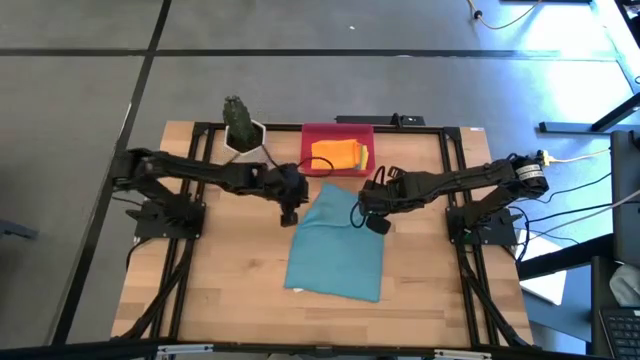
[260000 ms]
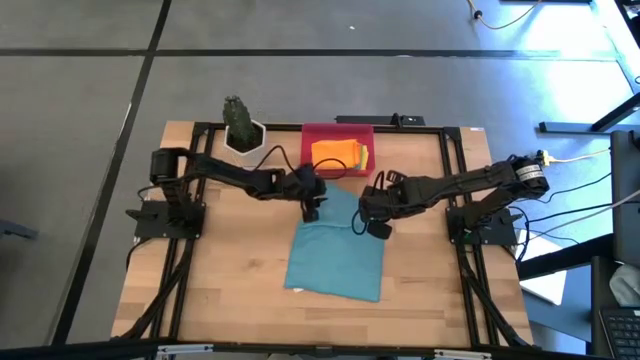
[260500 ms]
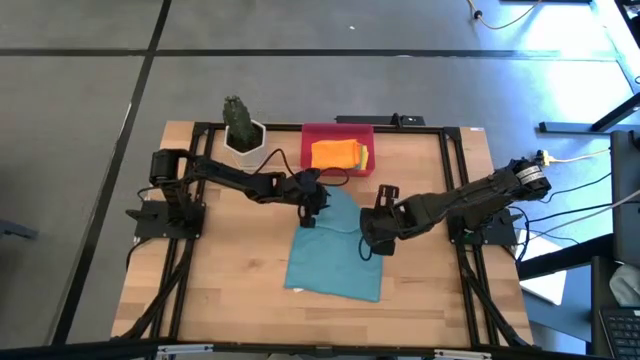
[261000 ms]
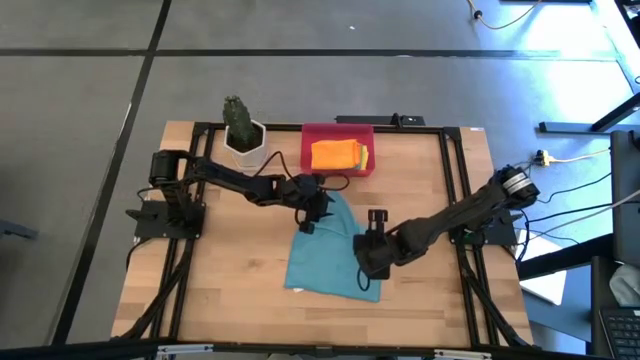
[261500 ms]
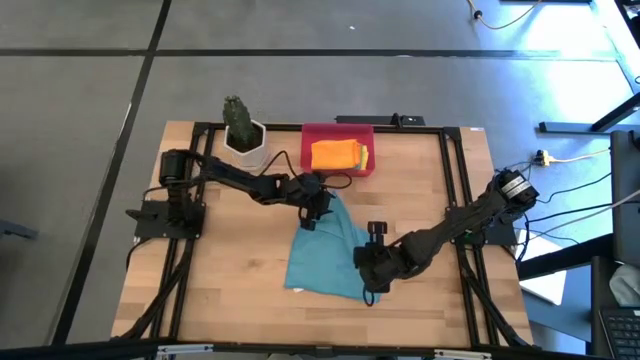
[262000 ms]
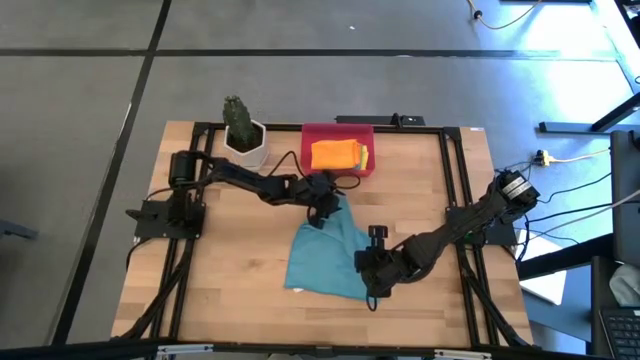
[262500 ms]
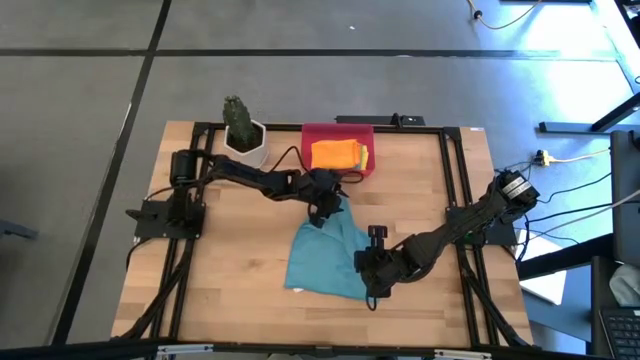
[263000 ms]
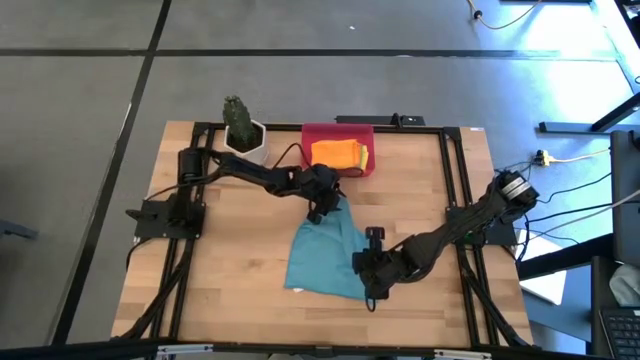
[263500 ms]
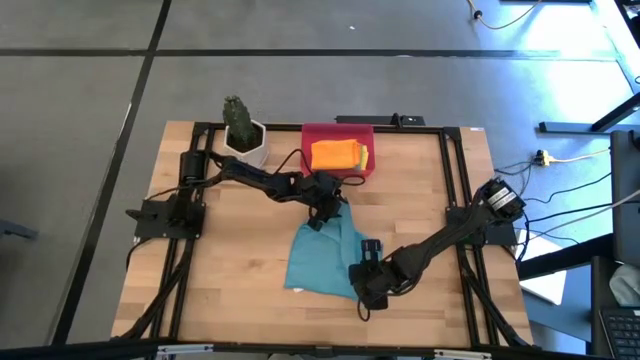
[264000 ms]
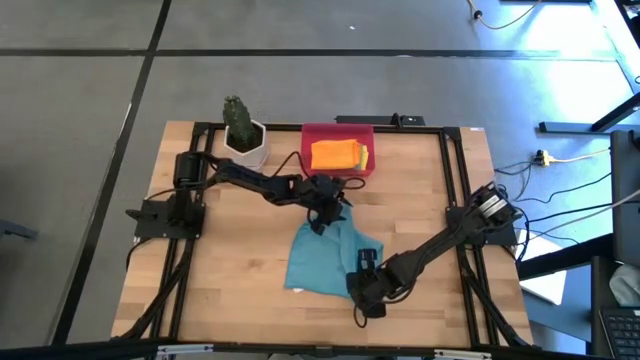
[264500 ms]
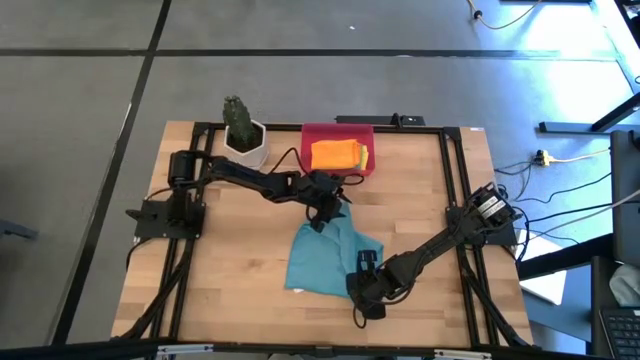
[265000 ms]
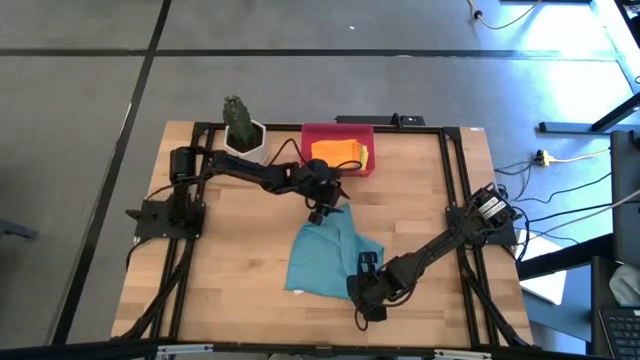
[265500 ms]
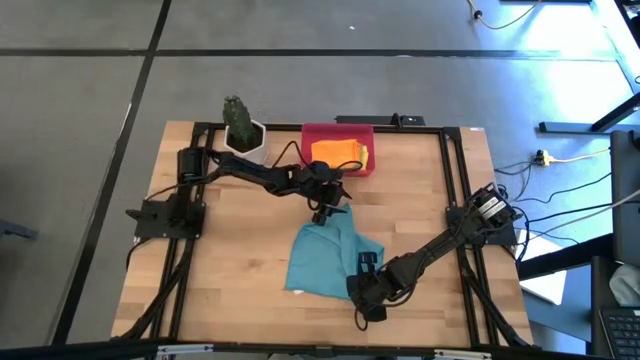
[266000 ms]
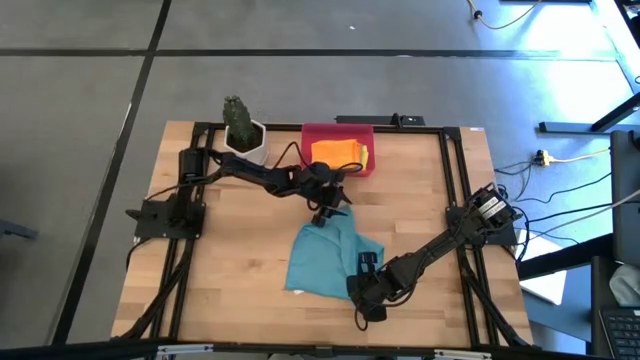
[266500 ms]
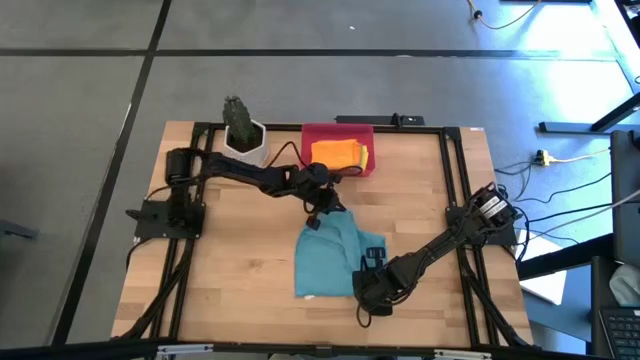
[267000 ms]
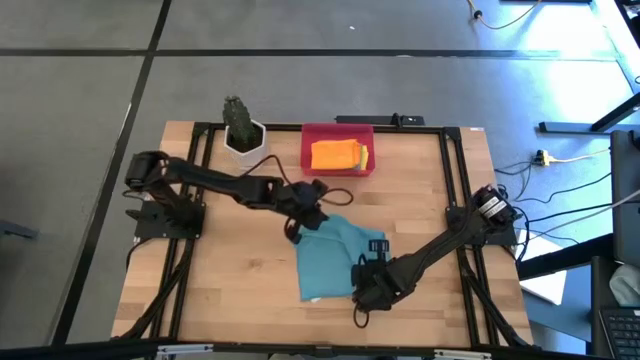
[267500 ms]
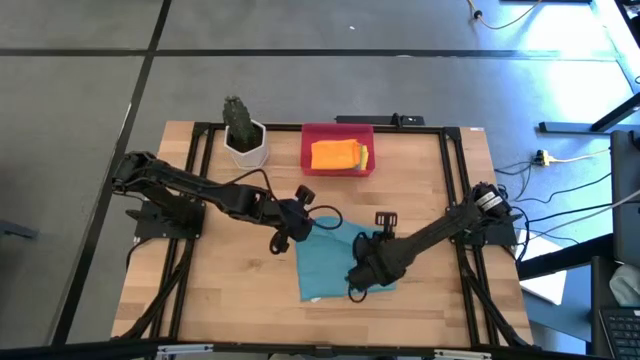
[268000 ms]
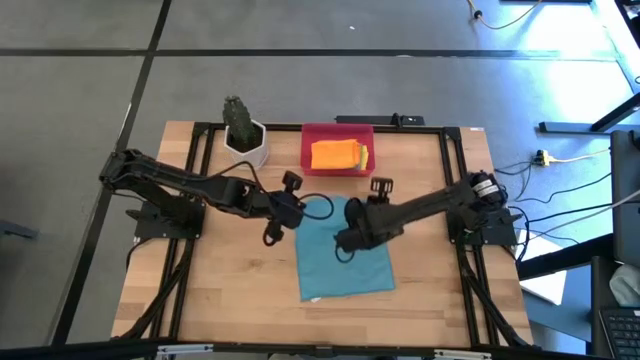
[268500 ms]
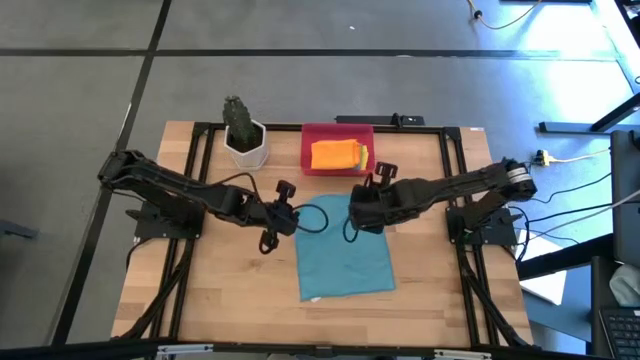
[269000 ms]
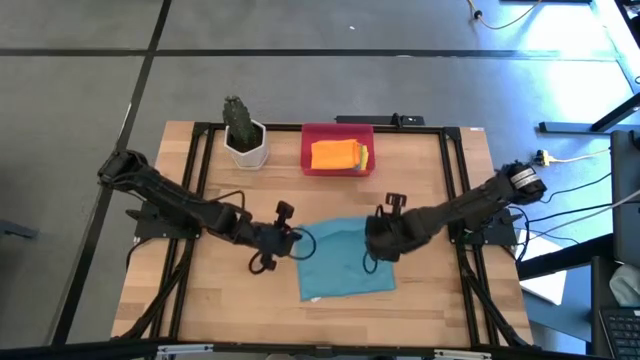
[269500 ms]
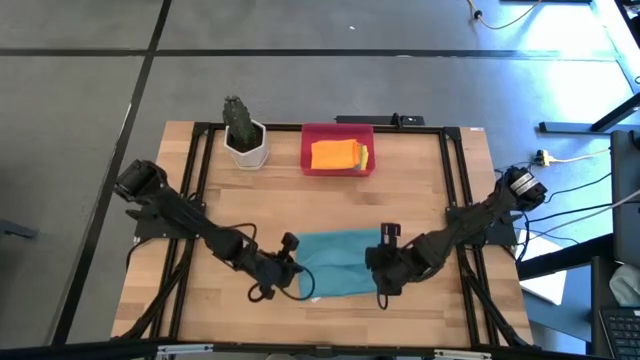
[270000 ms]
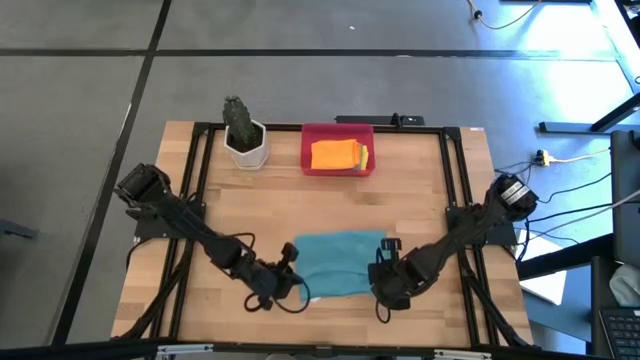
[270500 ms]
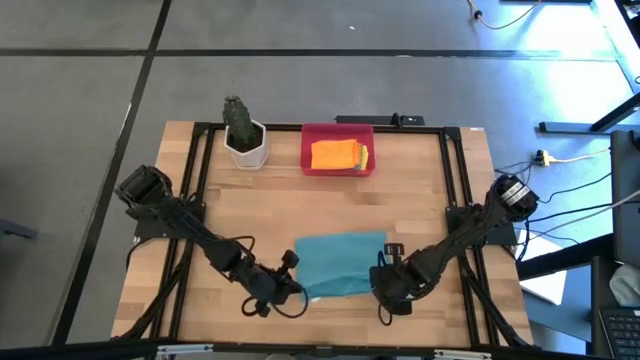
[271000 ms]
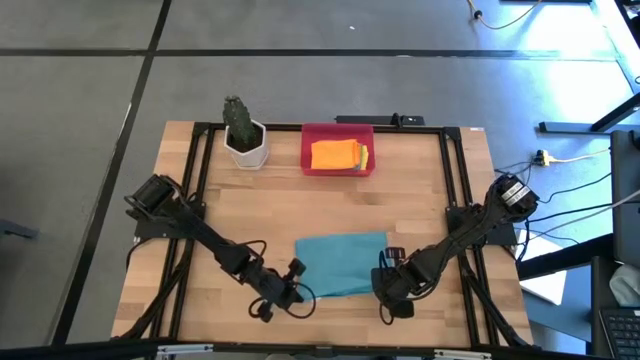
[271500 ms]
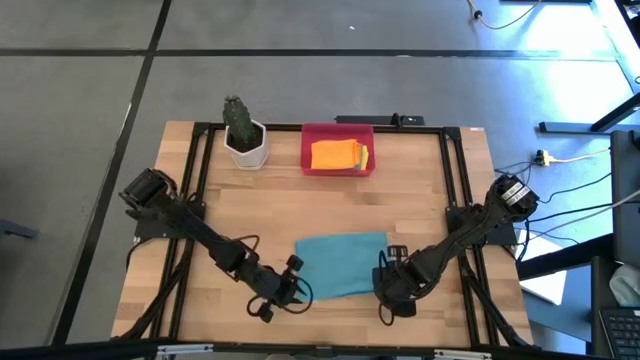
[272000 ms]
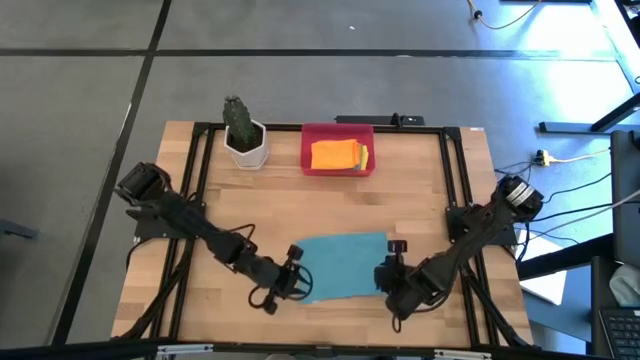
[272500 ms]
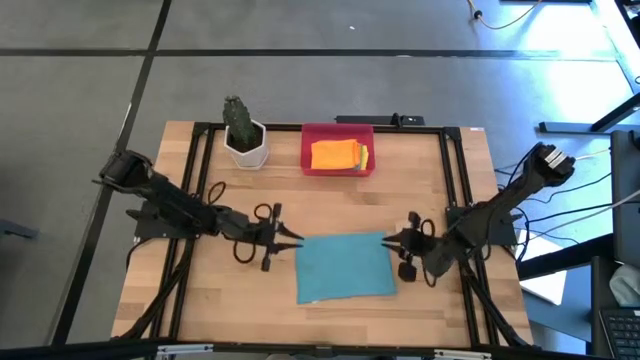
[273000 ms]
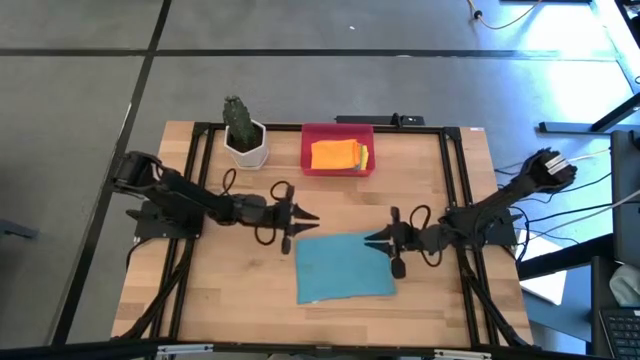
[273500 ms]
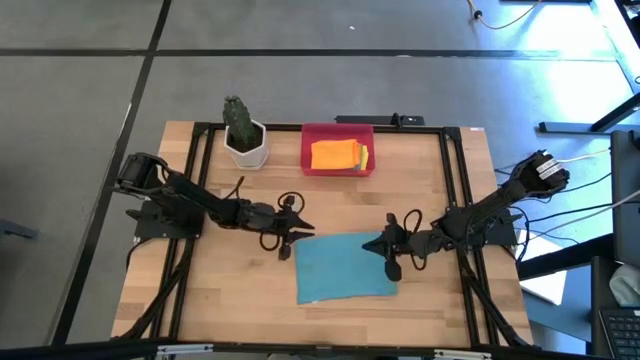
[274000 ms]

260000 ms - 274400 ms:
Task: Fold microfiber towels
Fold the blue microfiber cloth

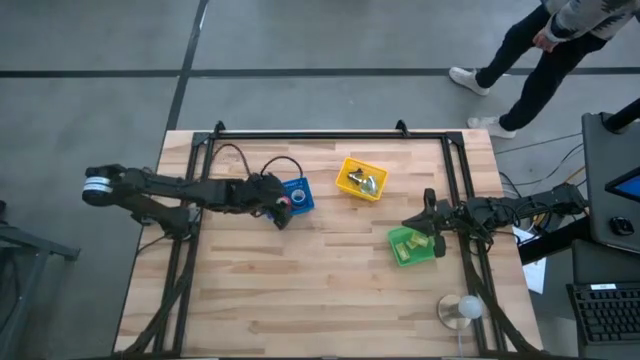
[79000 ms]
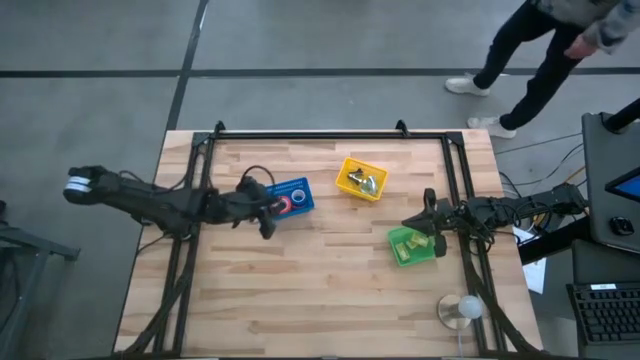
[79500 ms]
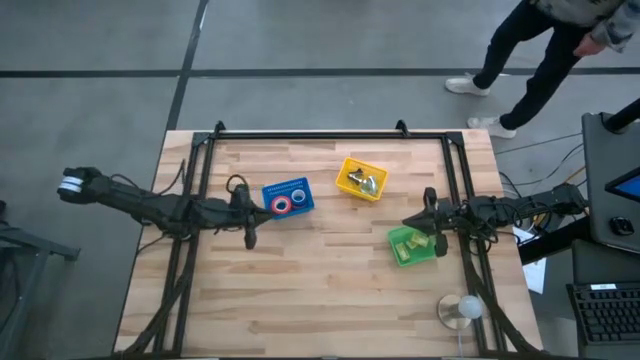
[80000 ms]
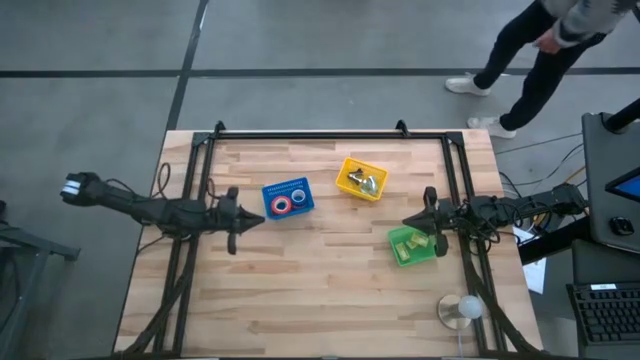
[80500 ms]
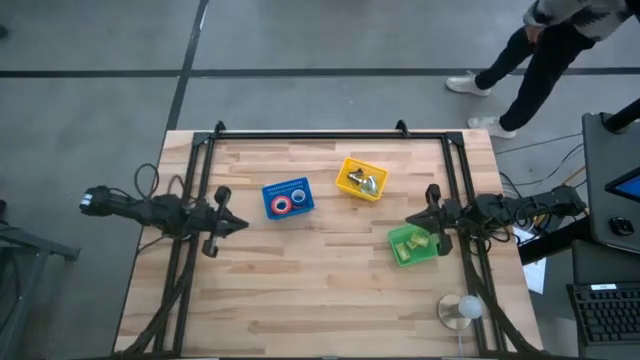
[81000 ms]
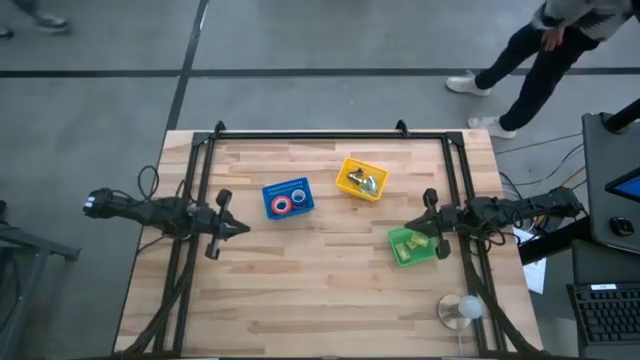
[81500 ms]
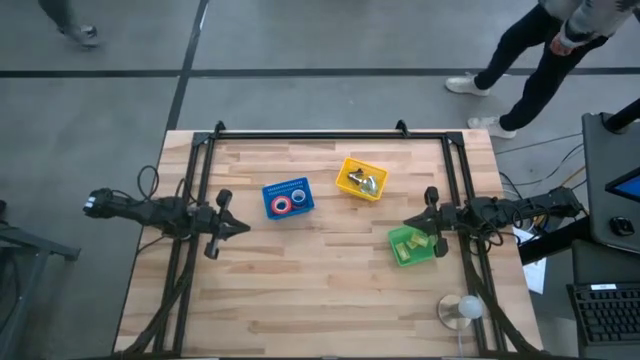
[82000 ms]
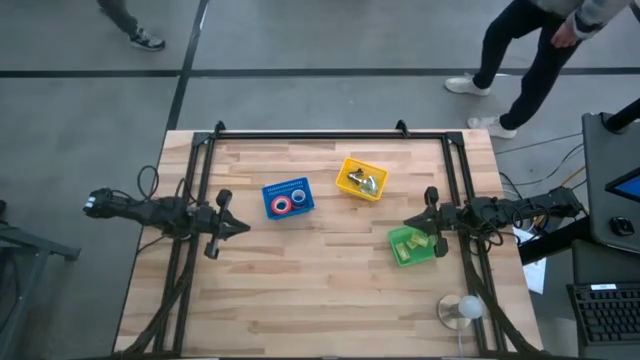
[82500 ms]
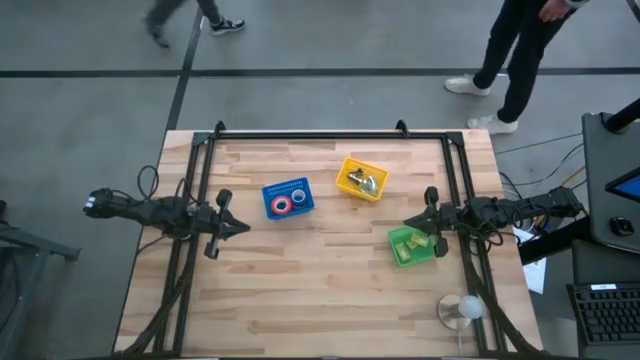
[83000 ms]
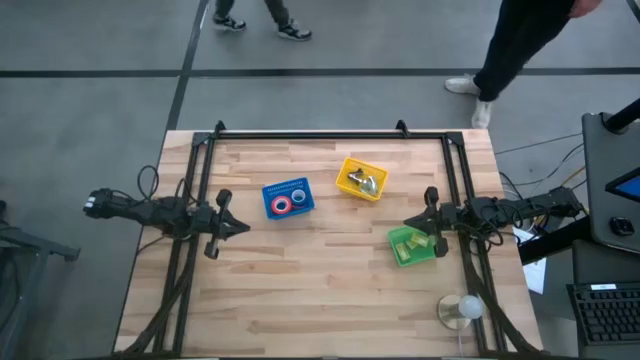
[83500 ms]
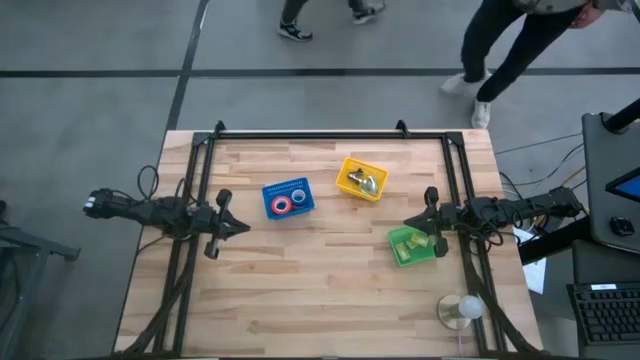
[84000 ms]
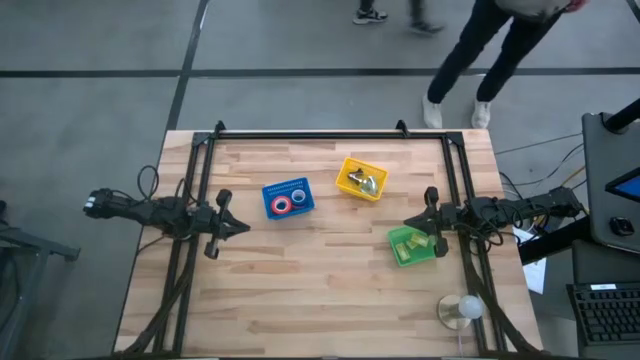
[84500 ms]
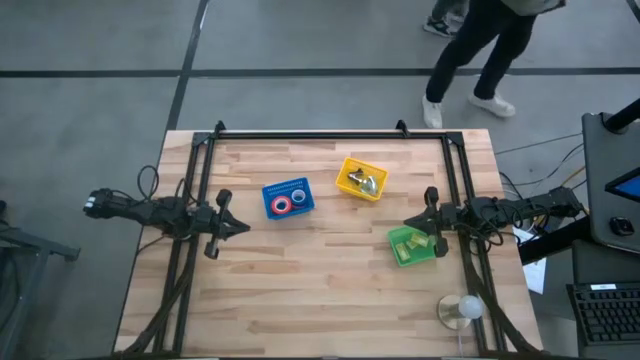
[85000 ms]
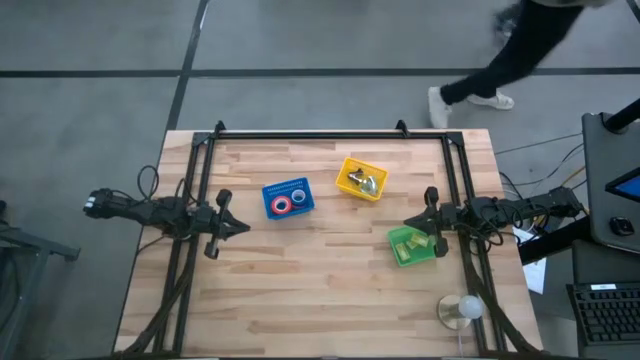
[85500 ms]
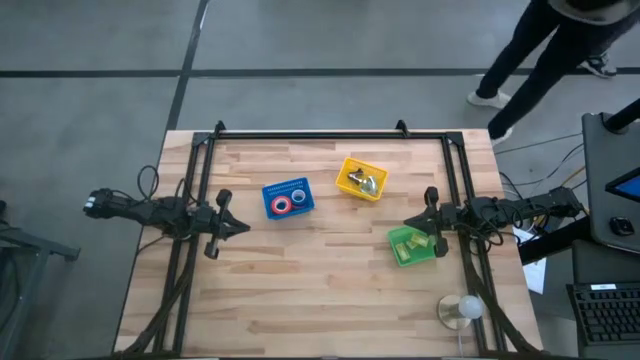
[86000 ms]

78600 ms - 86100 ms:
Task: Pick and place Stapler, Stapler remover, tape
Return to Home Position
